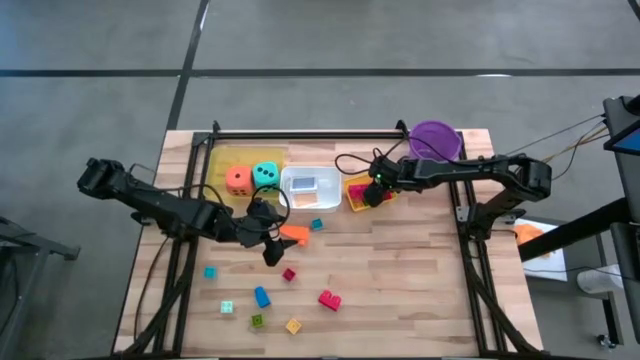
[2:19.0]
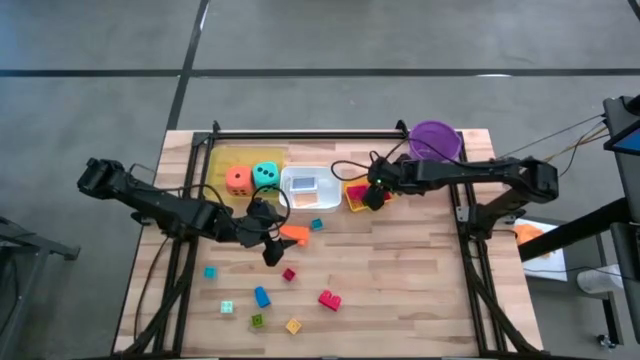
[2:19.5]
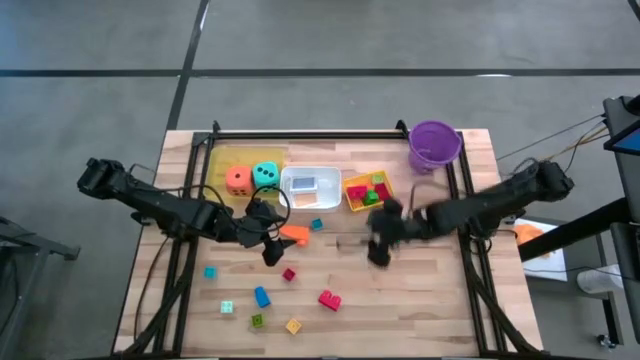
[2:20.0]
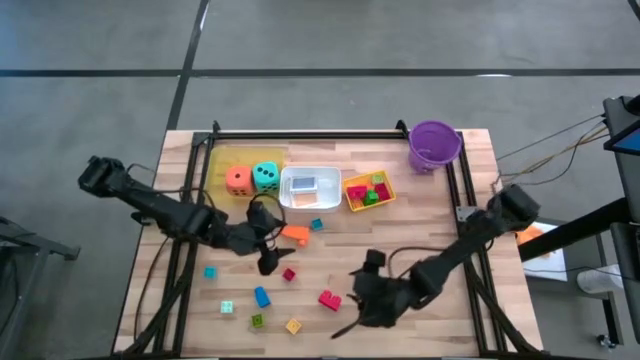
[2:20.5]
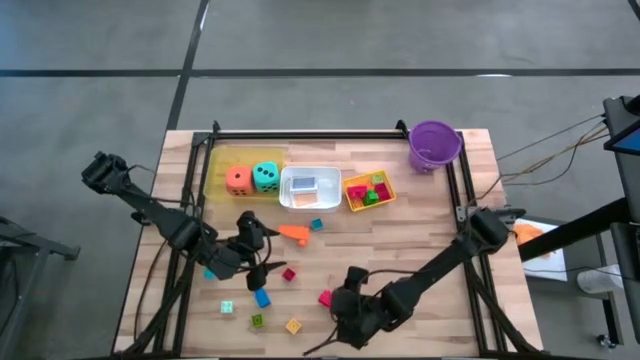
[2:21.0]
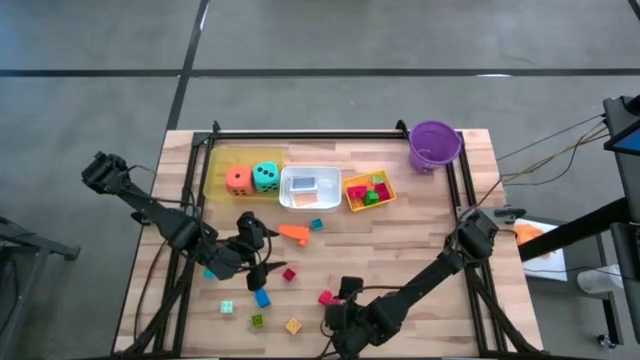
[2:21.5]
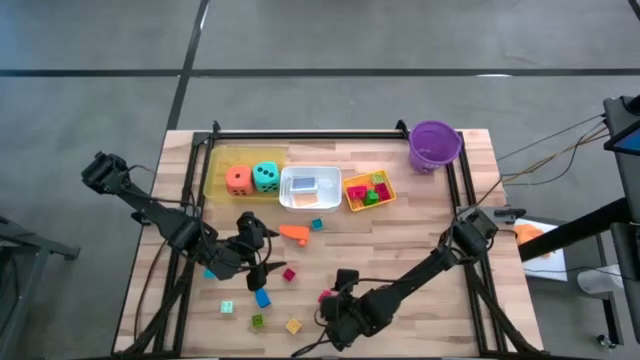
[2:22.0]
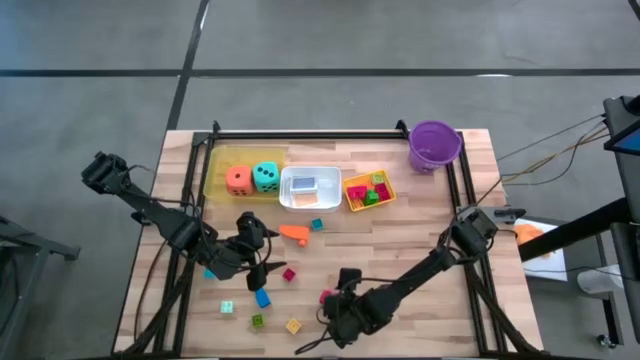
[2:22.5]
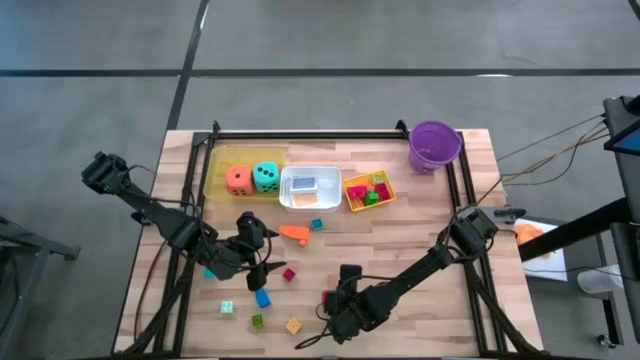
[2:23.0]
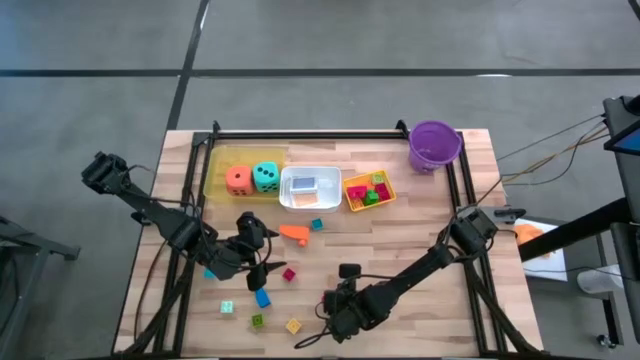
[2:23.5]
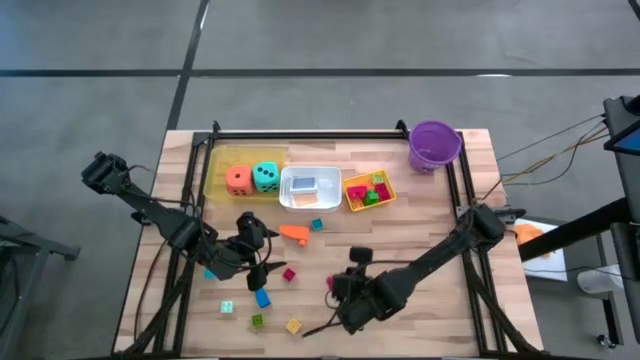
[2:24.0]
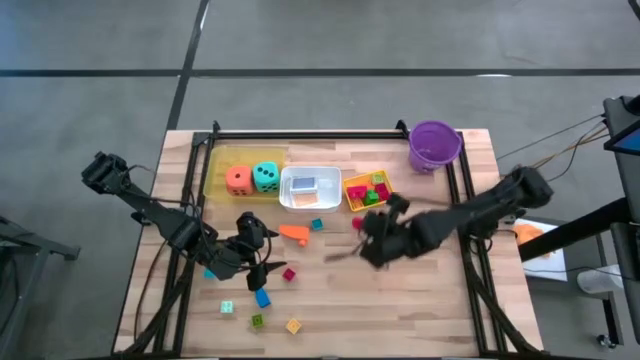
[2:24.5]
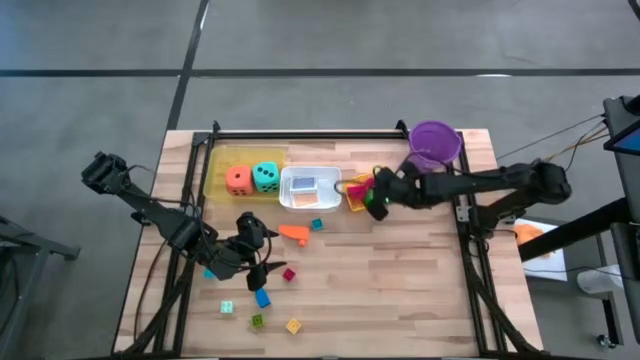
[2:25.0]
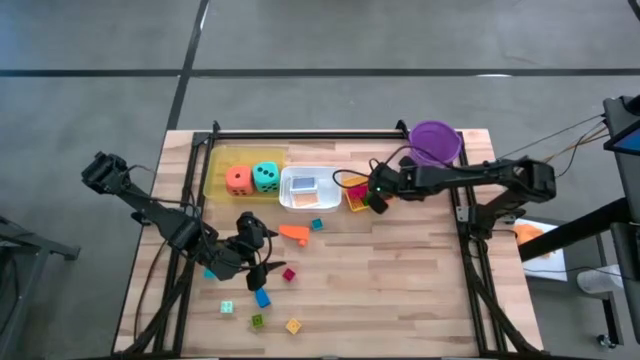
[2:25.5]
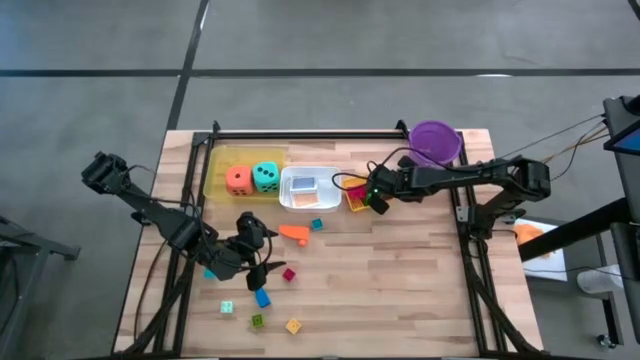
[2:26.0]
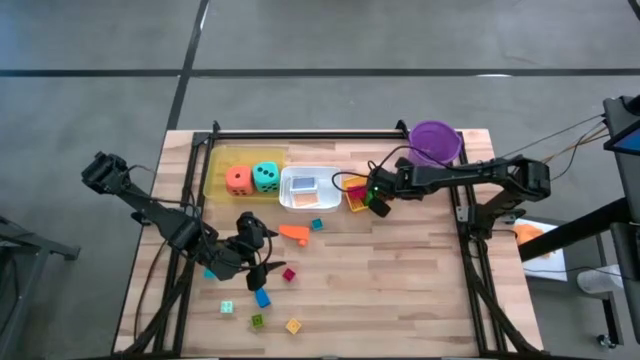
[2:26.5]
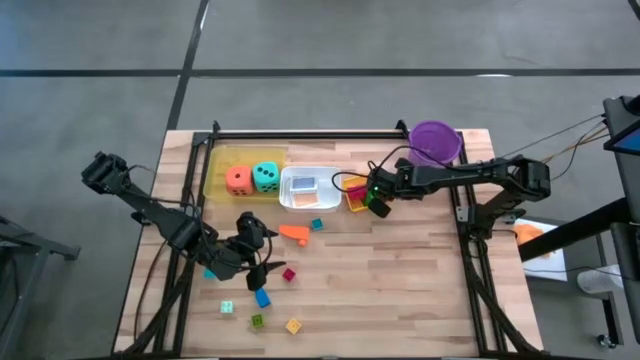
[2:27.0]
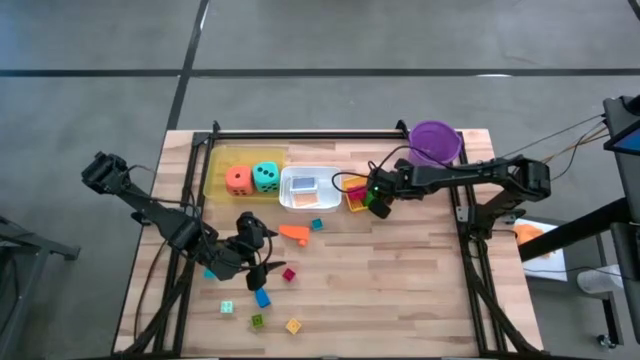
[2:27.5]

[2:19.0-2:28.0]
Task: Pick & Place Toys
Put the red game piece into the yellow bin

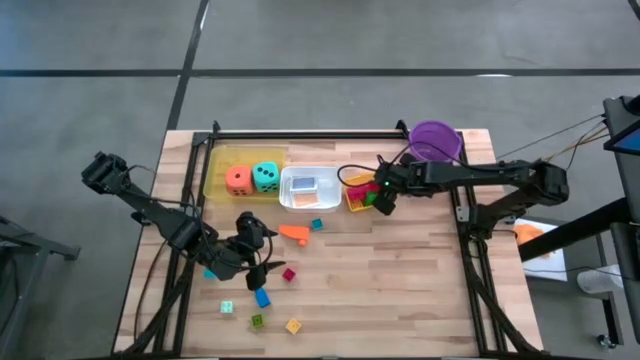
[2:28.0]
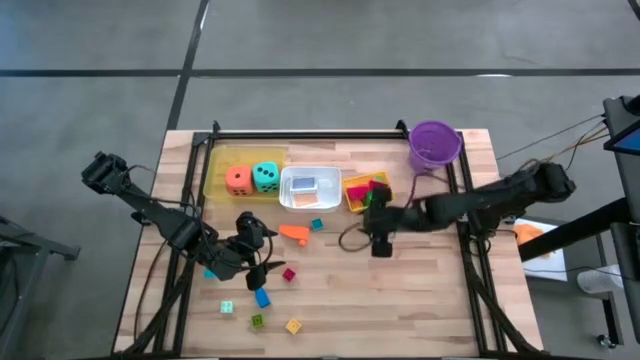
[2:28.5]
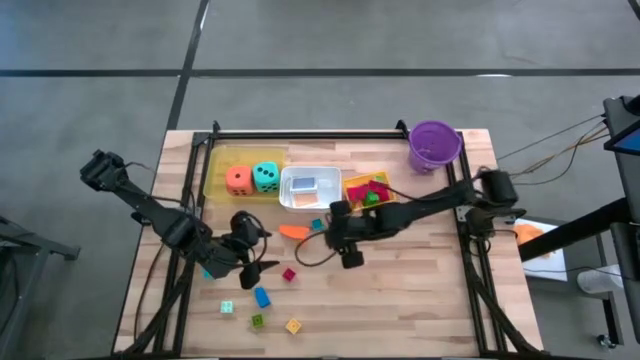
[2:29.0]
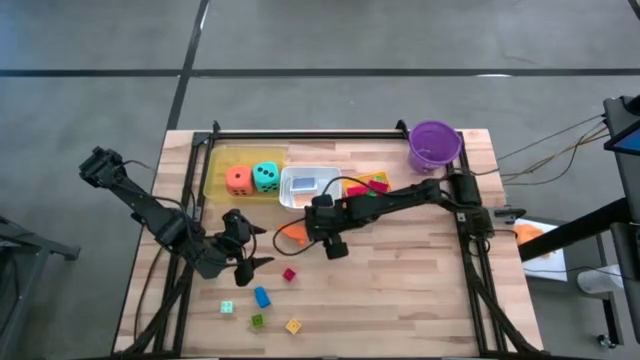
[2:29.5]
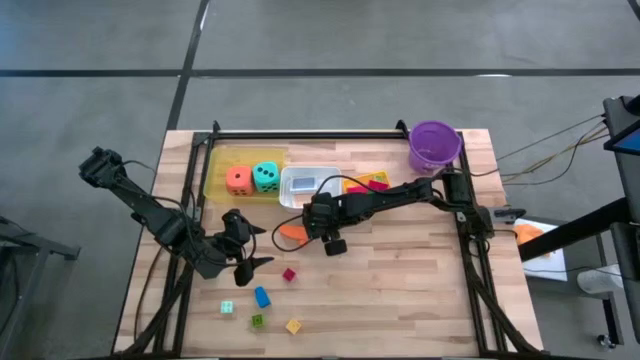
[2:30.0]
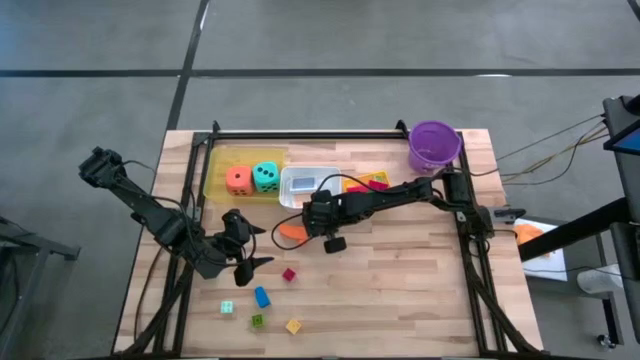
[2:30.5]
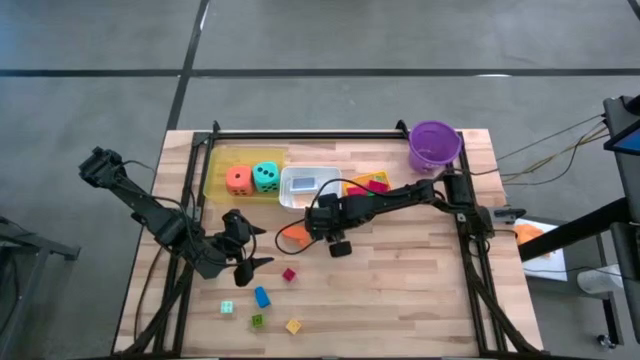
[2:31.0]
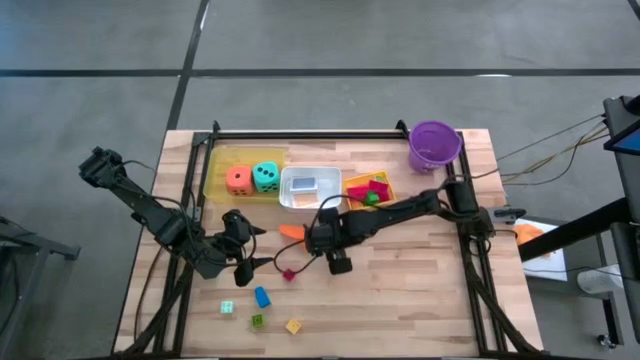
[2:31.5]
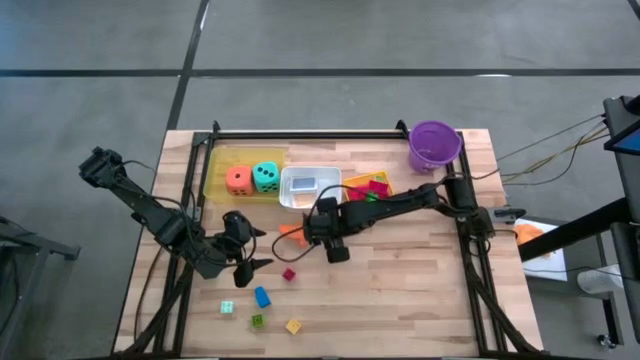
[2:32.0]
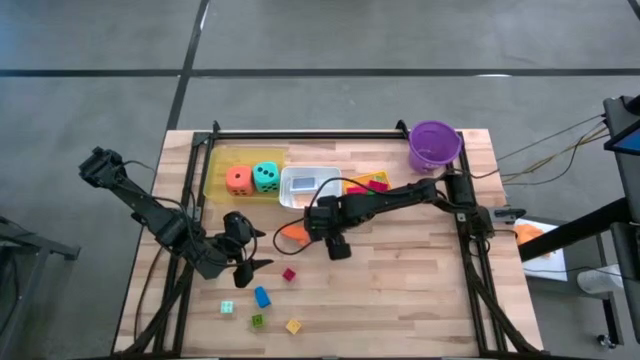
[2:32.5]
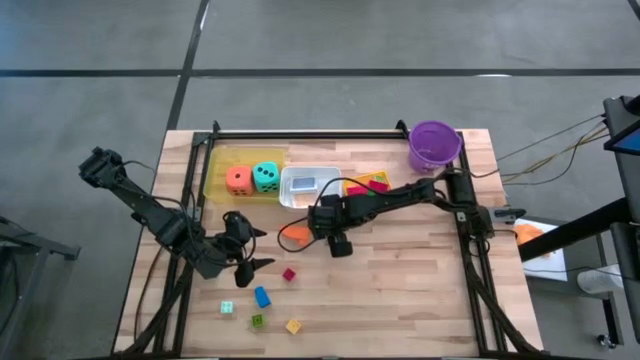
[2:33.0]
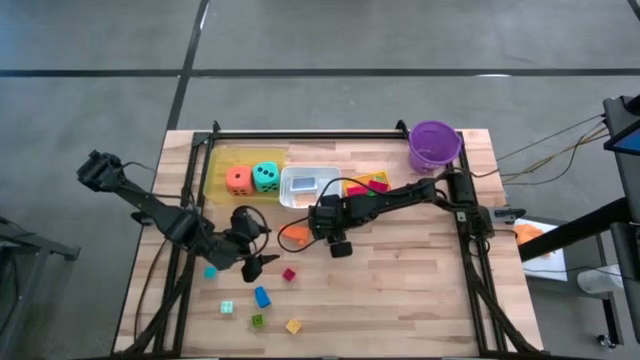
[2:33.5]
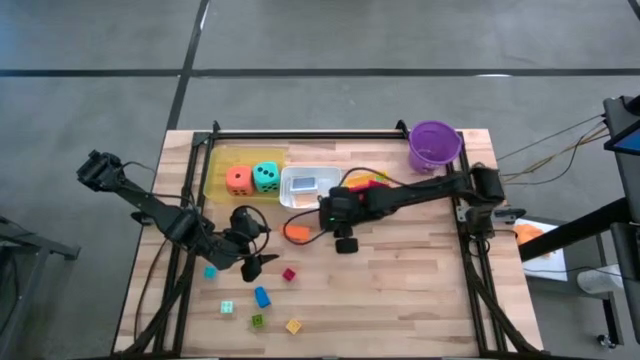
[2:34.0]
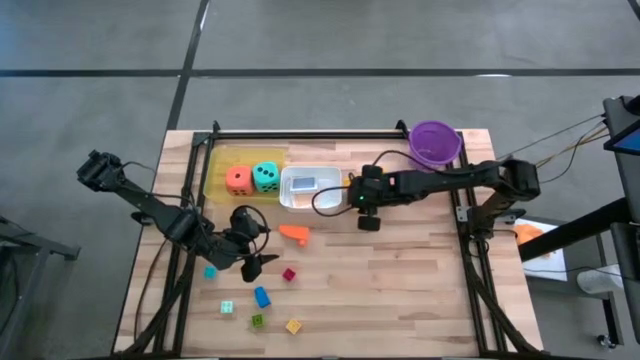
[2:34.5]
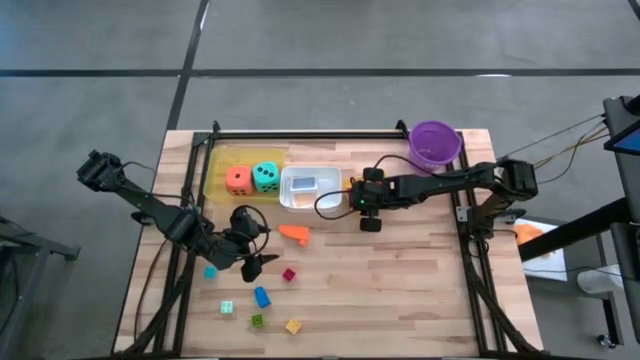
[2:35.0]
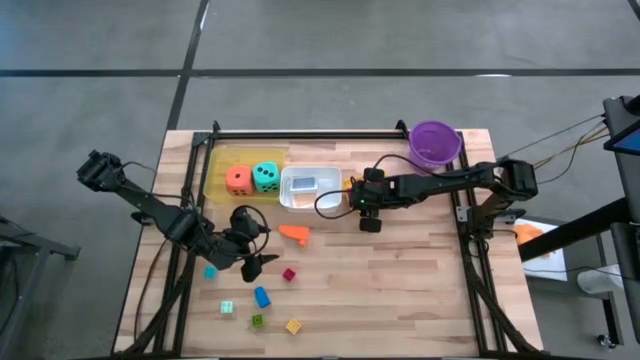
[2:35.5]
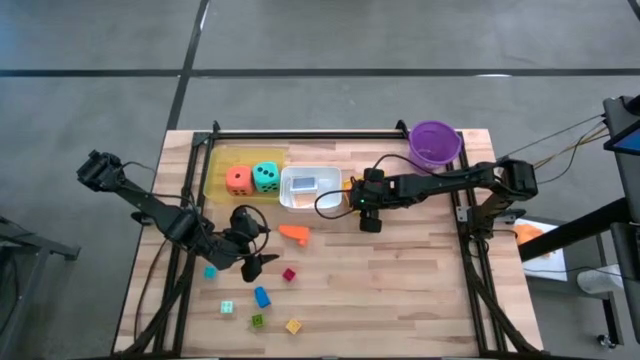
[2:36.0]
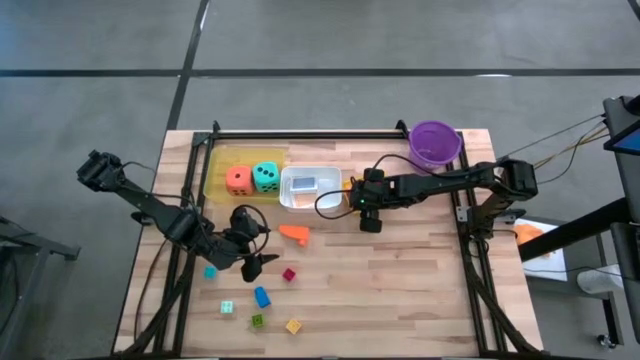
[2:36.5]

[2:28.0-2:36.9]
Put the blue game piece into the yellow bin

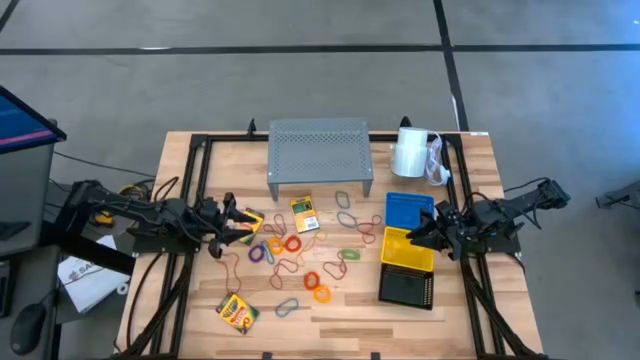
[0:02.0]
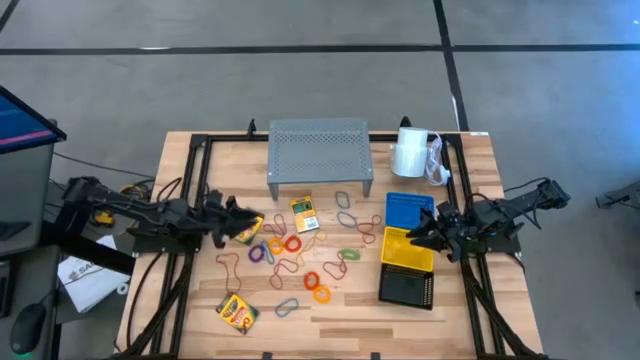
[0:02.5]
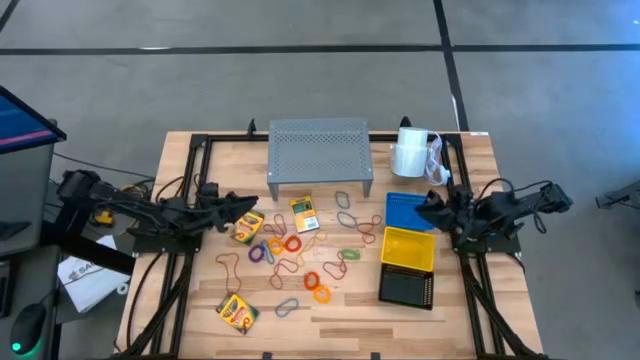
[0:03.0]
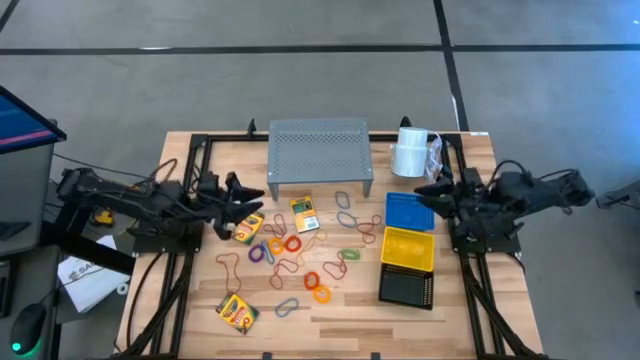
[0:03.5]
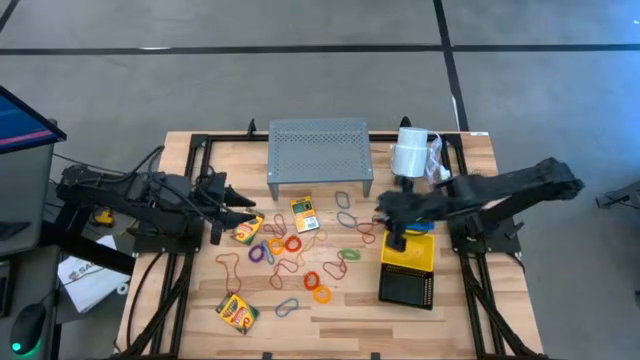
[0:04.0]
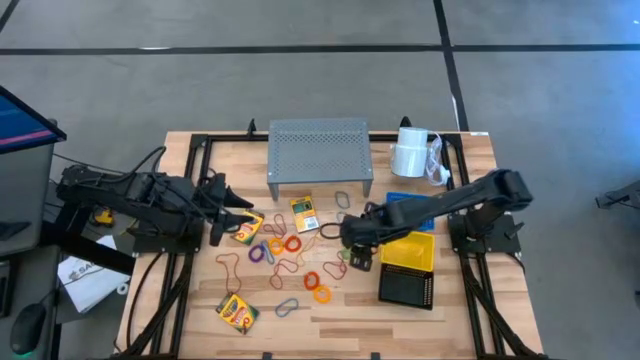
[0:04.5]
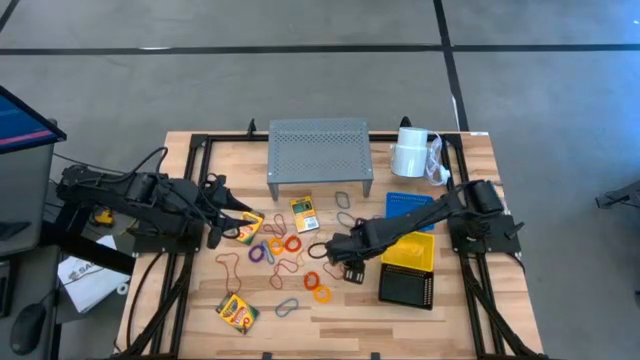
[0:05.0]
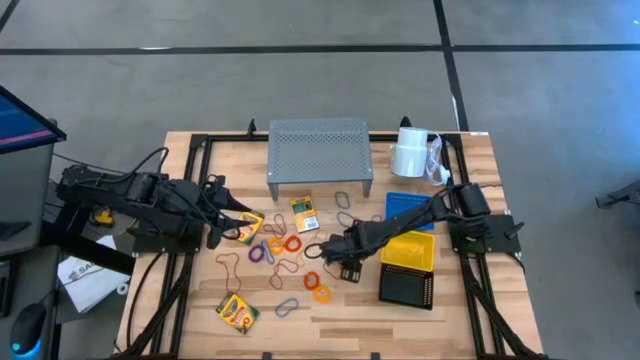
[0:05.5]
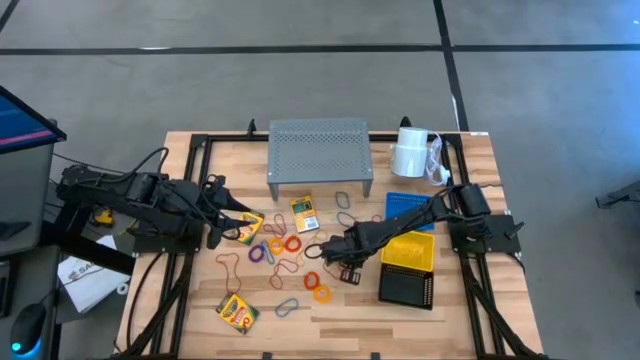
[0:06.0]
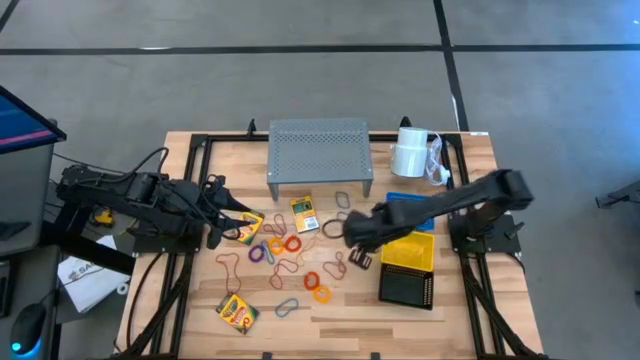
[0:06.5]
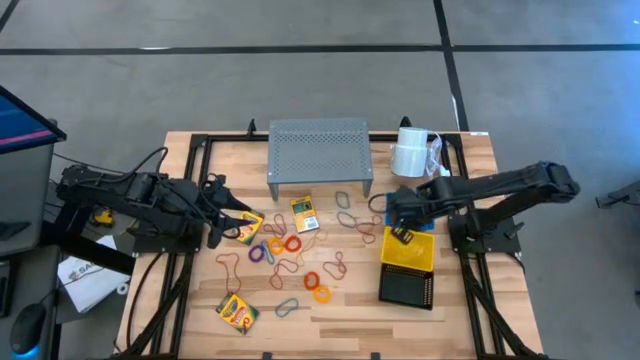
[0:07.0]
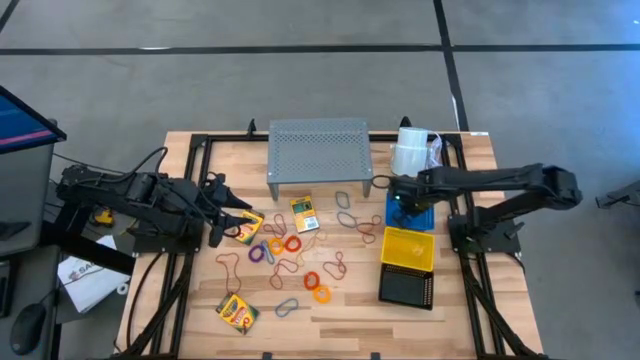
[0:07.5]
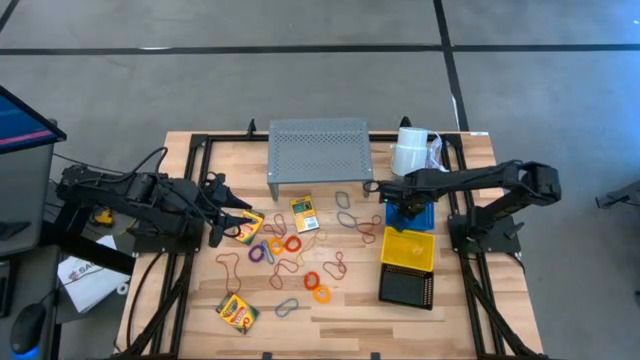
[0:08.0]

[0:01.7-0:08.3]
Task: Pick & Place Office Desk Supplies
Put the green spring keychain into the blue basket
